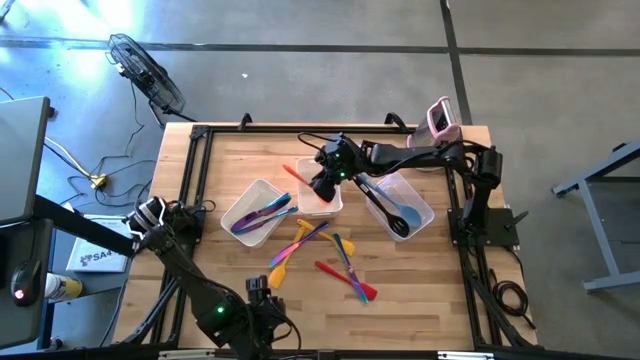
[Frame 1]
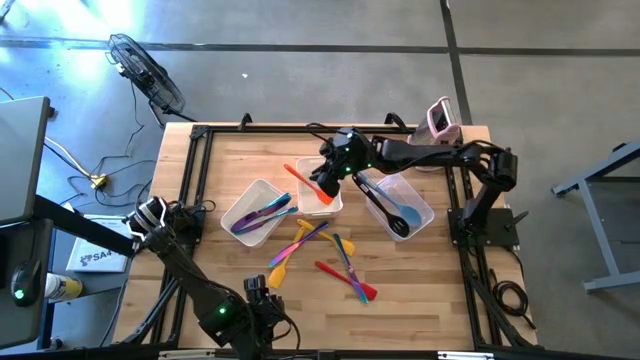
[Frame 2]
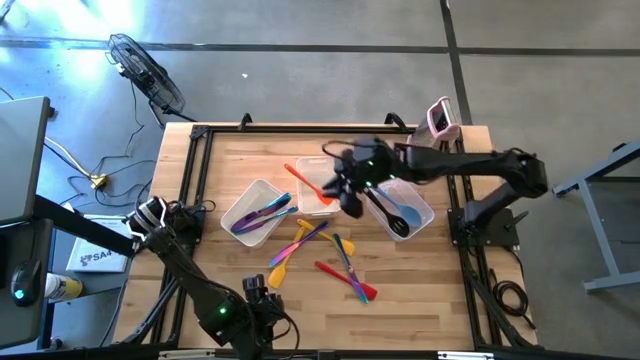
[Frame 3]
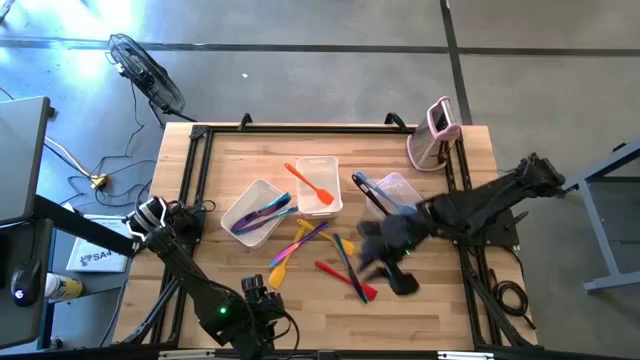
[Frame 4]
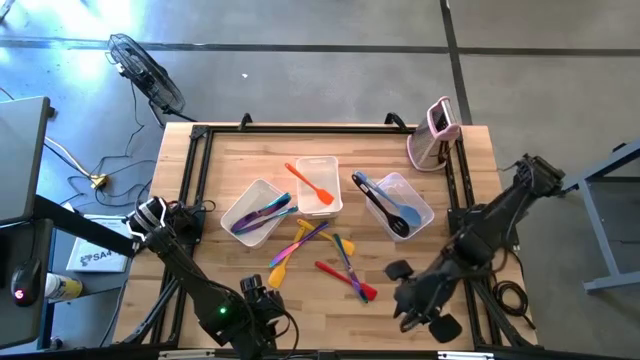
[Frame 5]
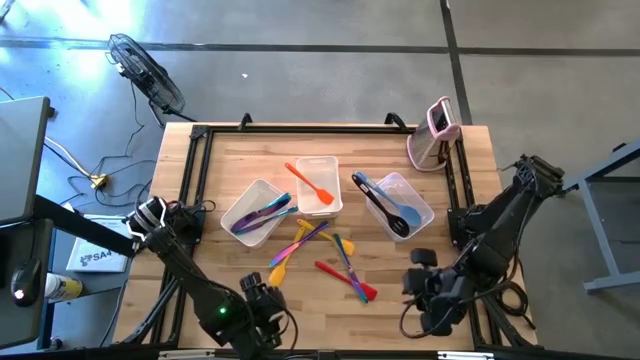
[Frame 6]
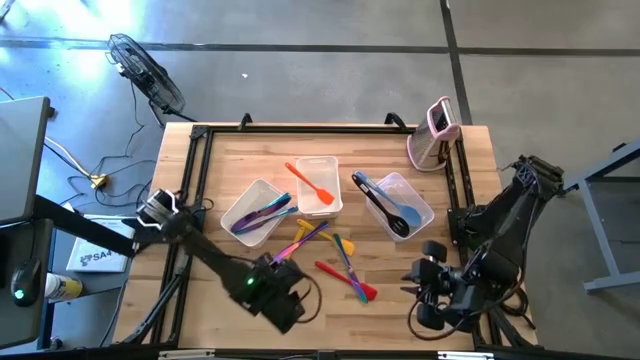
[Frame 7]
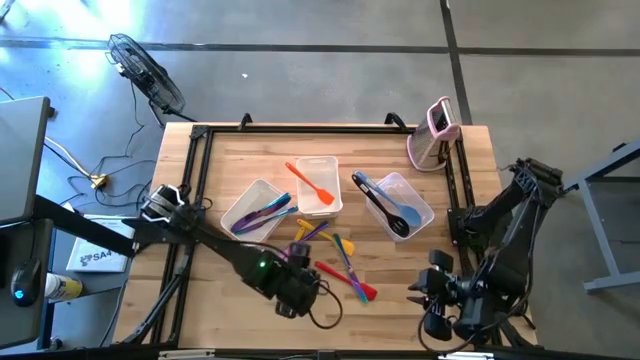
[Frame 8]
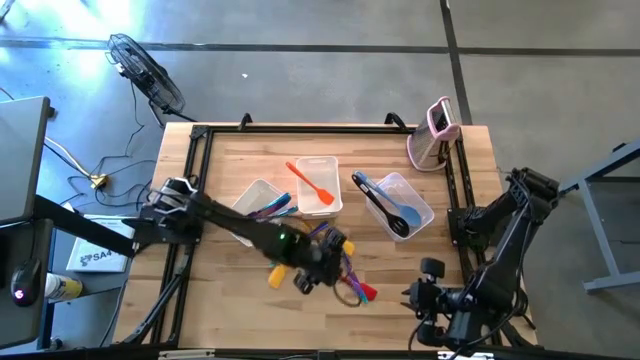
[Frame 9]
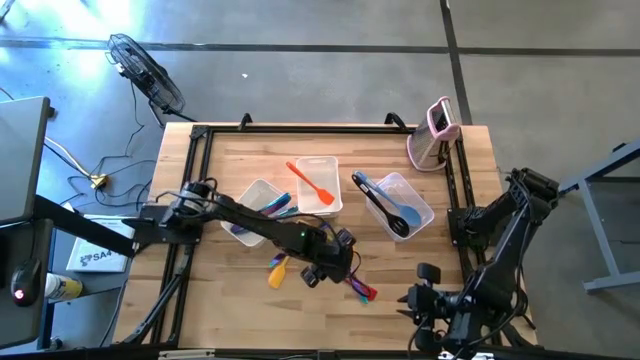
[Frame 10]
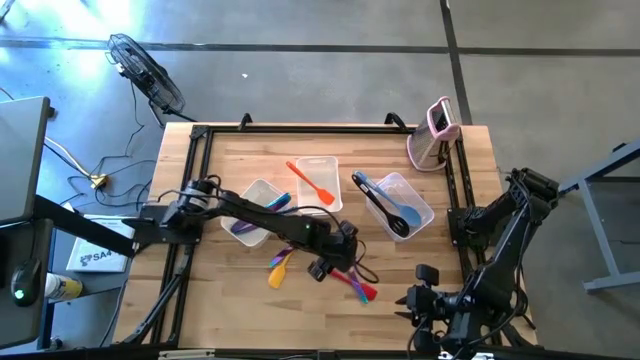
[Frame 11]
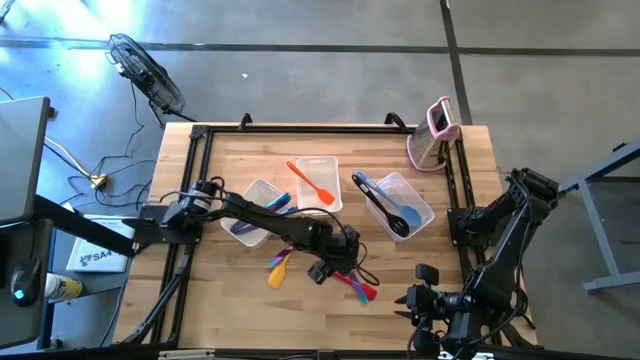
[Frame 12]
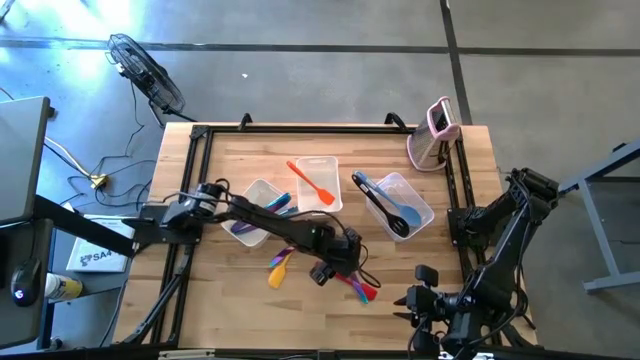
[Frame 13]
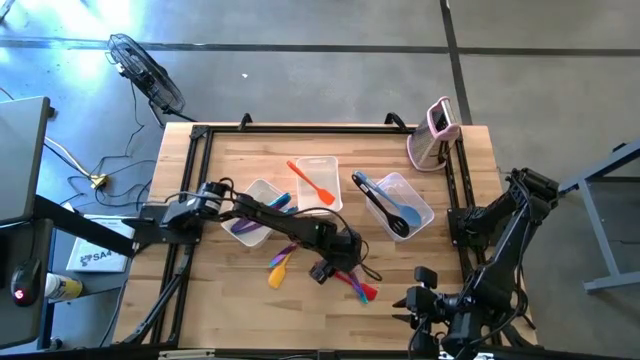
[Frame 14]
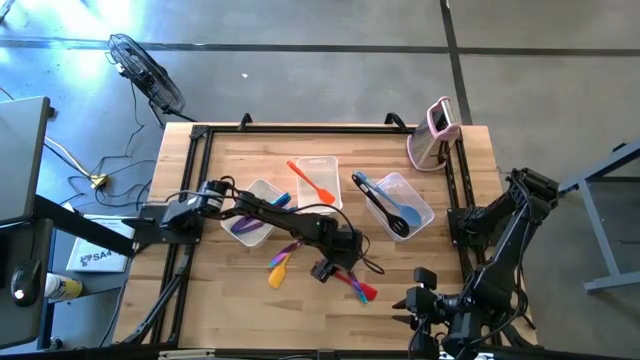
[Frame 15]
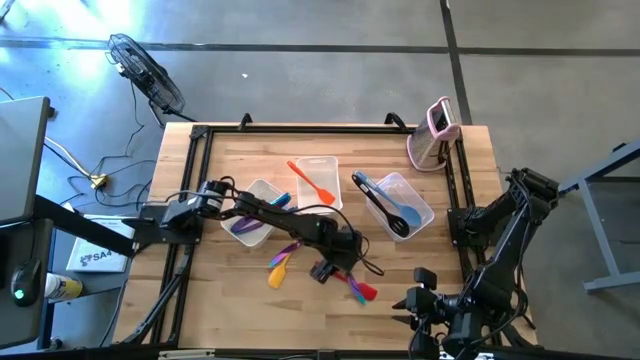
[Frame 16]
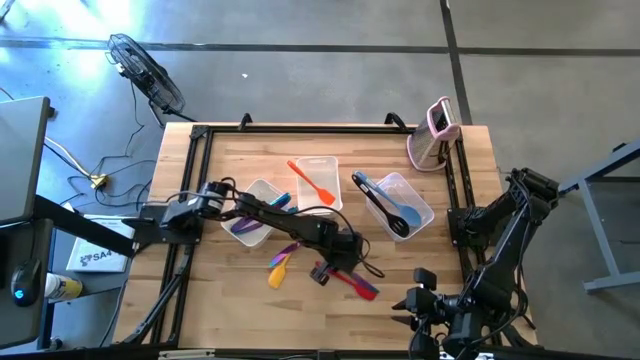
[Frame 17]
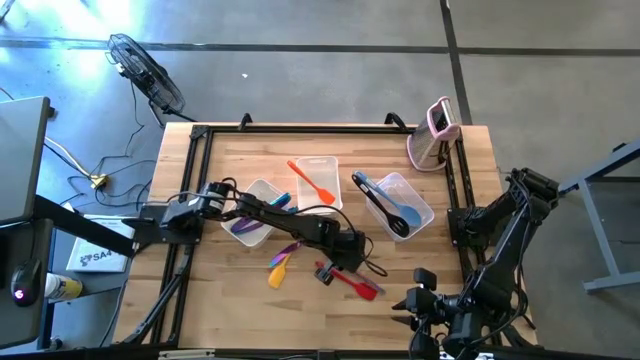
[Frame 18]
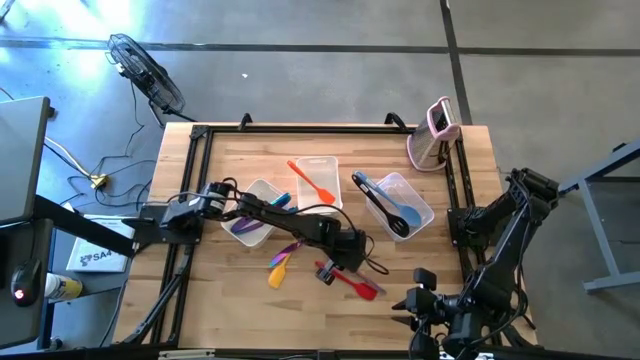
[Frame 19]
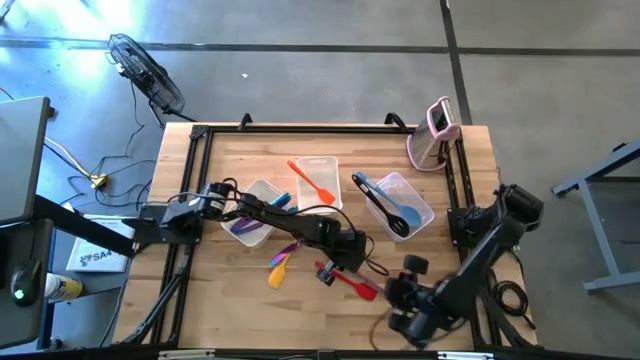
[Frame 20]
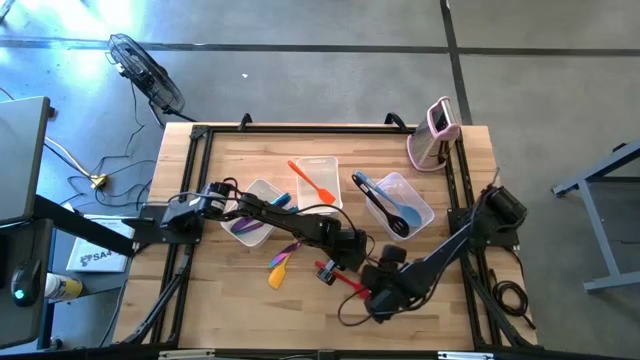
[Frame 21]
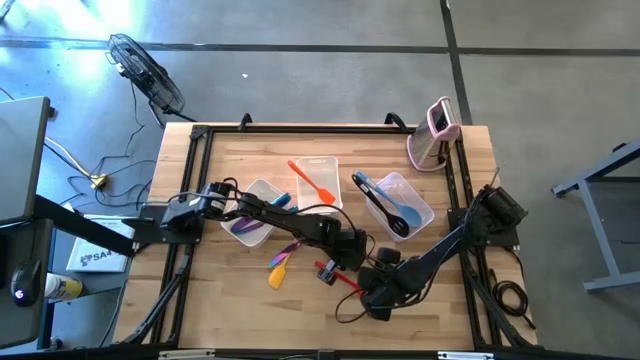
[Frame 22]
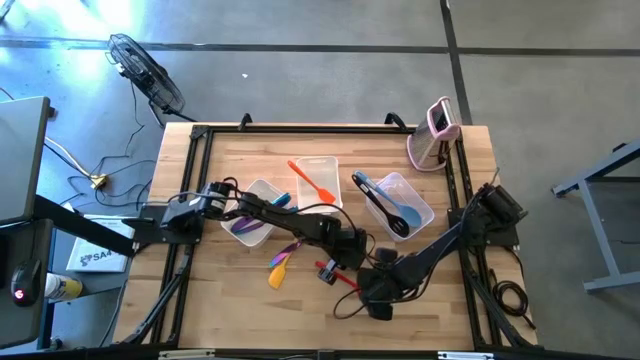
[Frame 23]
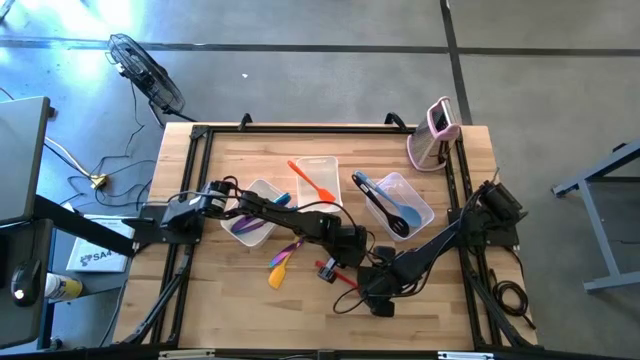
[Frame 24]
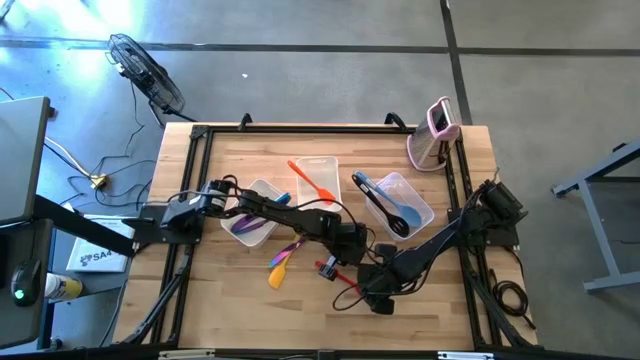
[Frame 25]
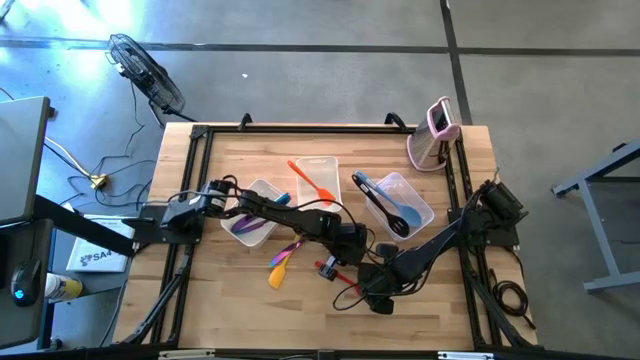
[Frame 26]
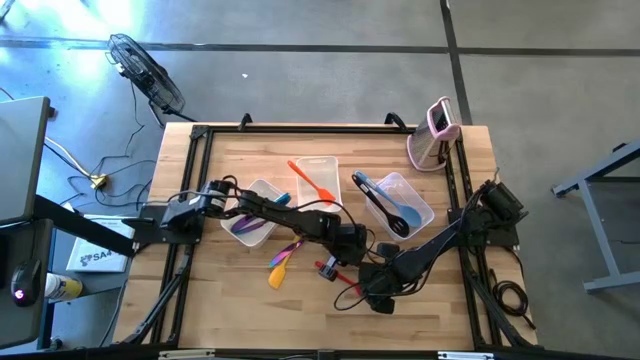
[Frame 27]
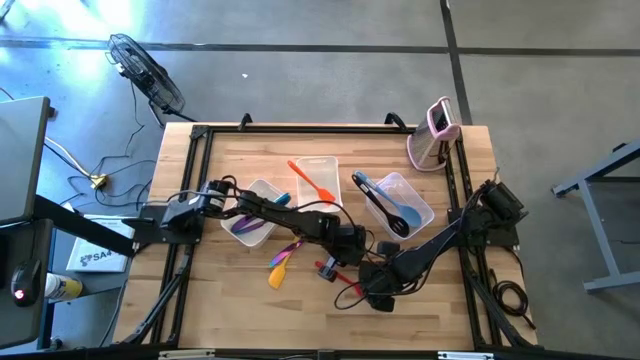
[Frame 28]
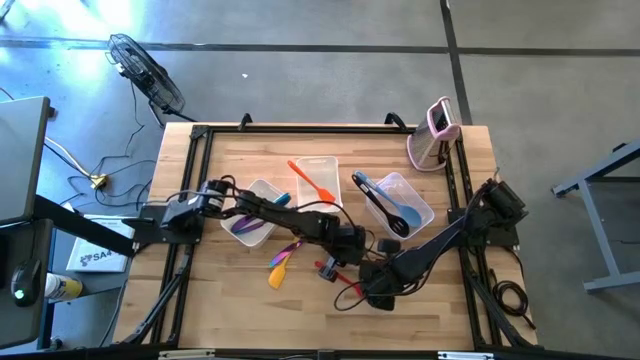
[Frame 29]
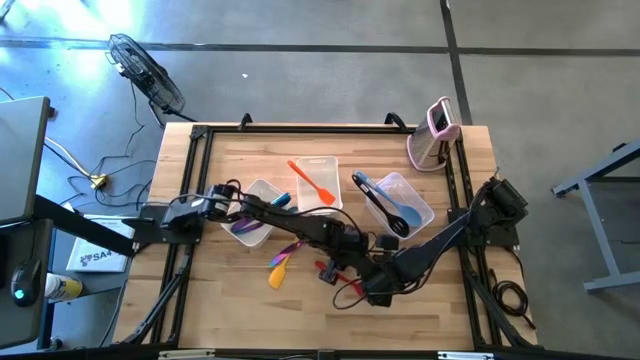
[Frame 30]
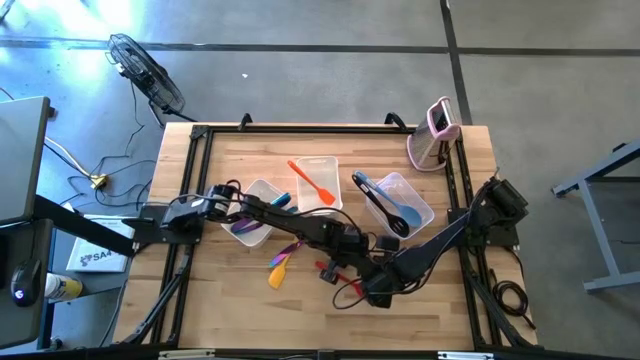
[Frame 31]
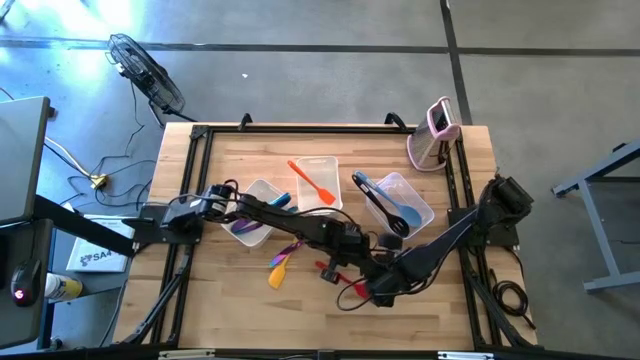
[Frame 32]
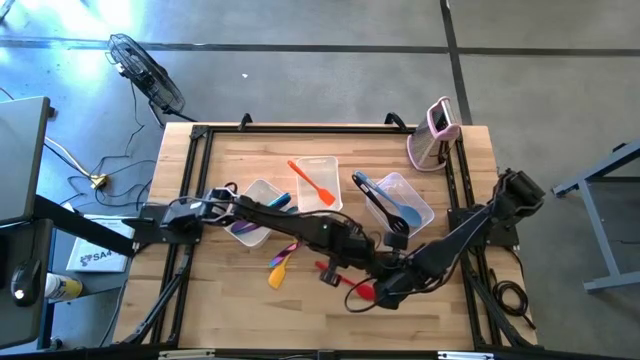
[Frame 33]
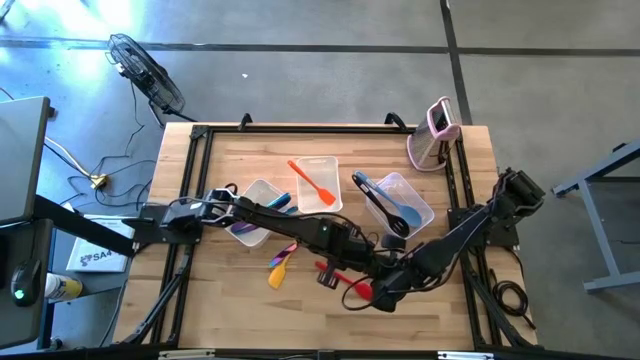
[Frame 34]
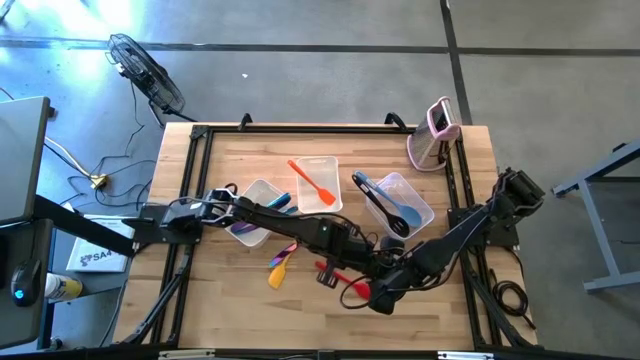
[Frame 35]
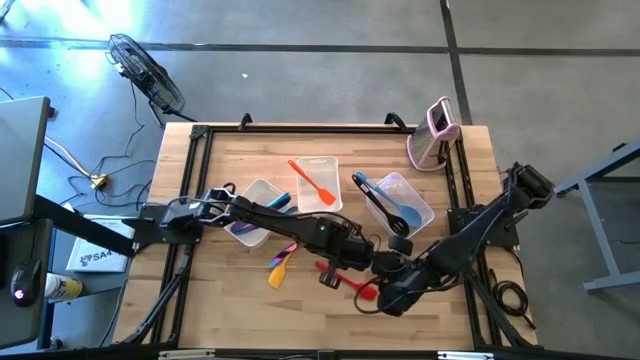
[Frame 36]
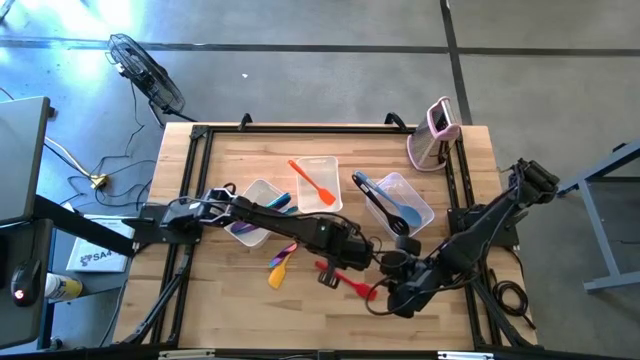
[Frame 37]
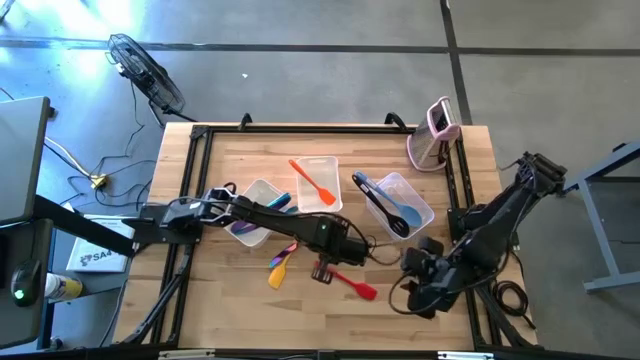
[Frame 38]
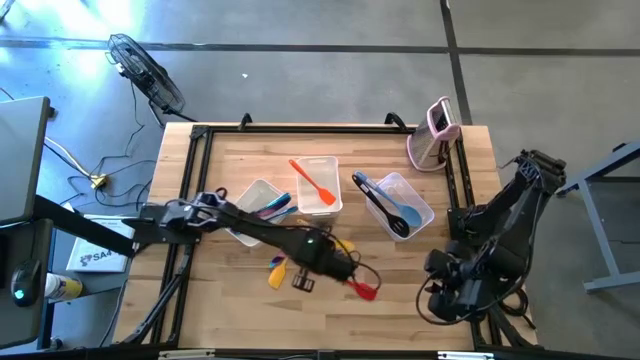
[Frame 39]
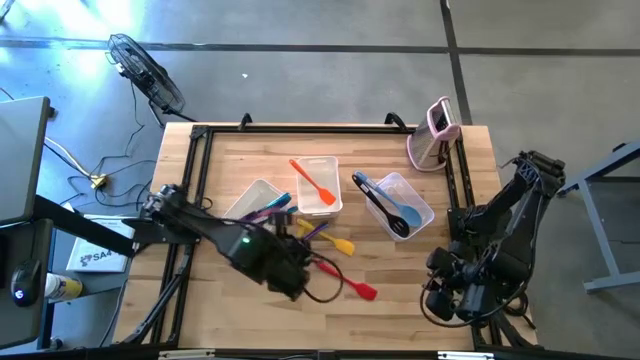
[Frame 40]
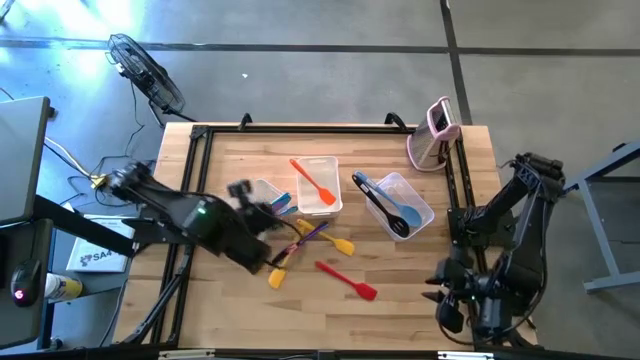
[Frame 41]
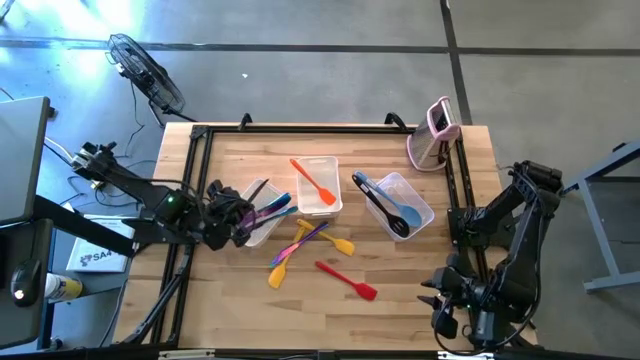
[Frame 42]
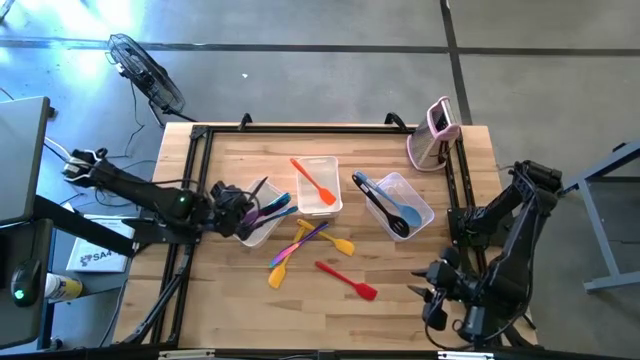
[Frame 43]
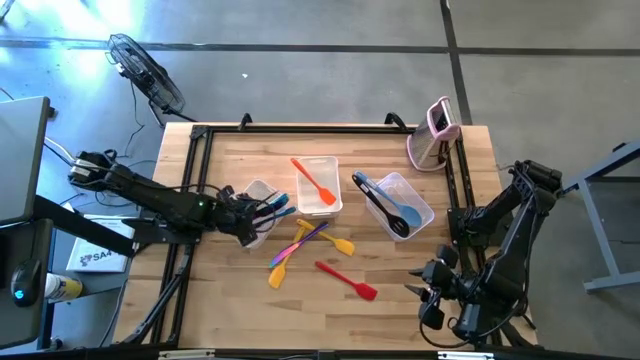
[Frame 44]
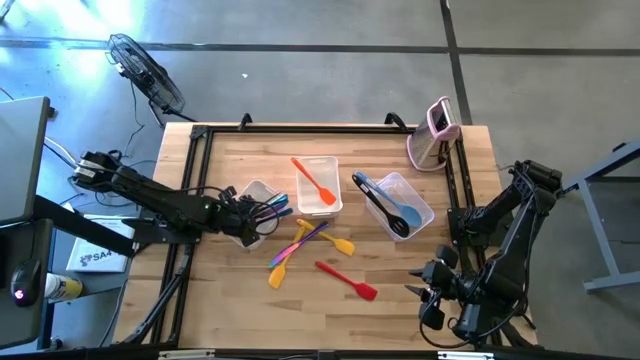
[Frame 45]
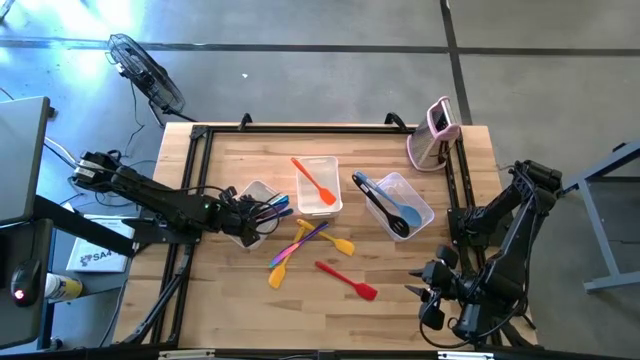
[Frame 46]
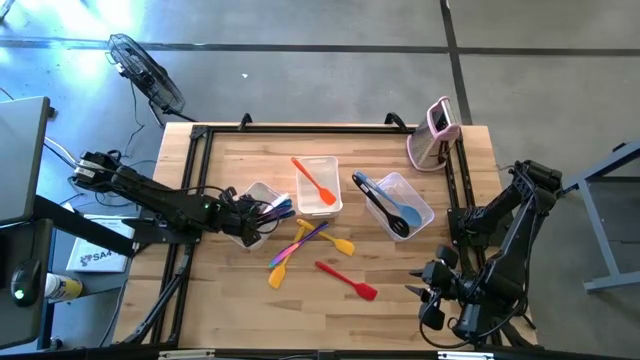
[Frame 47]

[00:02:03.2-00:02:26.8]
Task: Pick & Place Kitchen Items
Put the blue table knife into the left white bin
